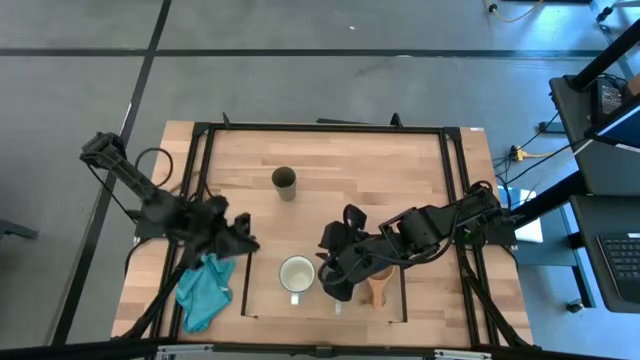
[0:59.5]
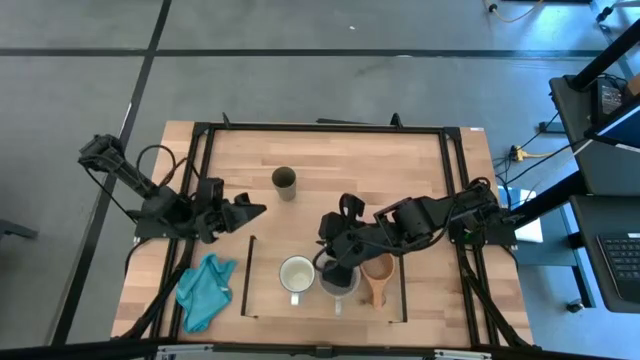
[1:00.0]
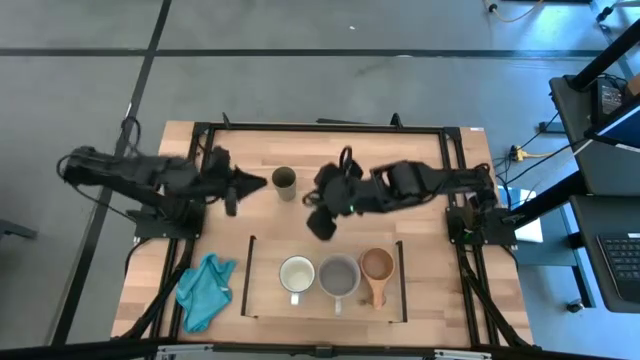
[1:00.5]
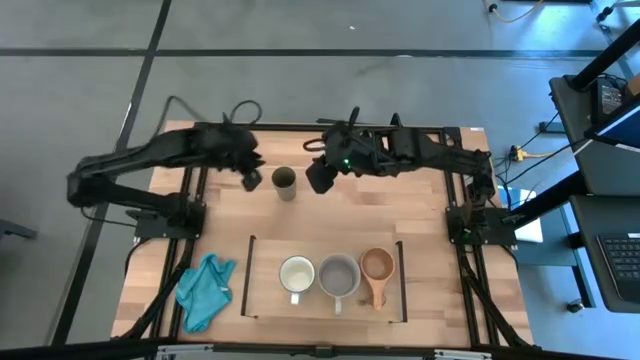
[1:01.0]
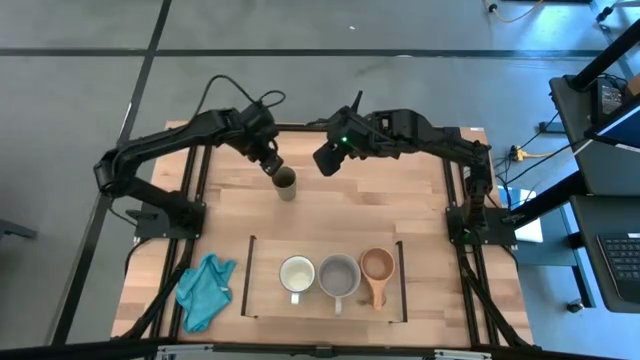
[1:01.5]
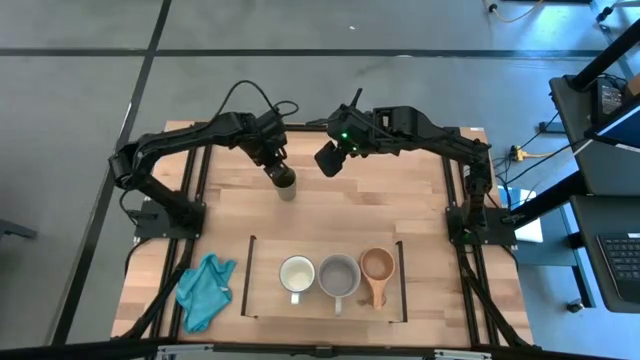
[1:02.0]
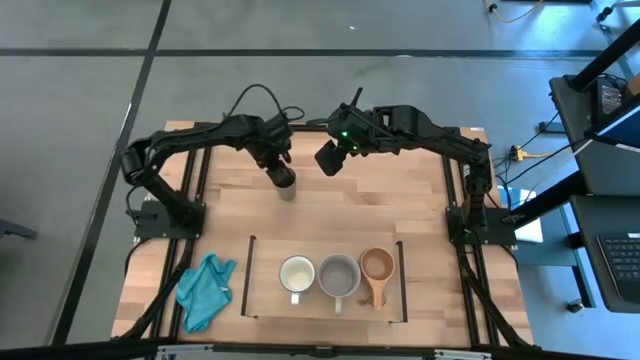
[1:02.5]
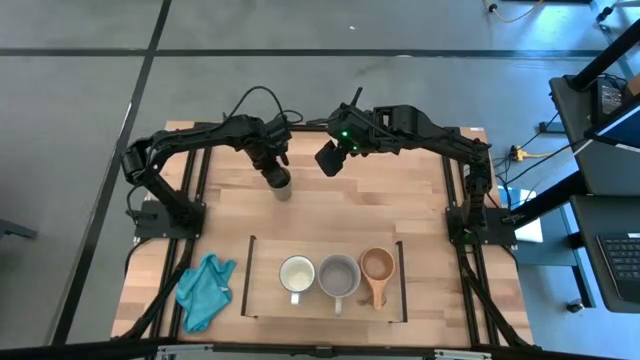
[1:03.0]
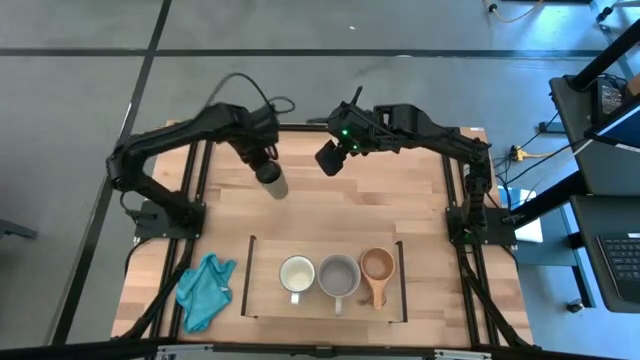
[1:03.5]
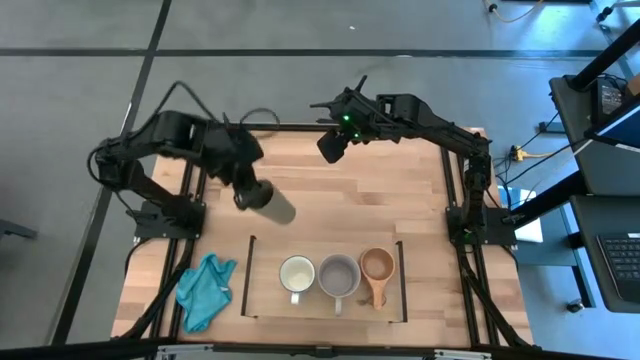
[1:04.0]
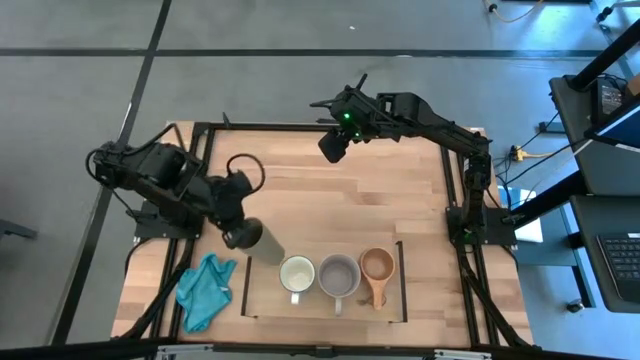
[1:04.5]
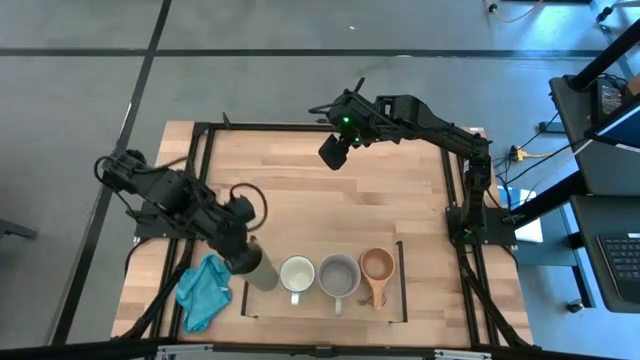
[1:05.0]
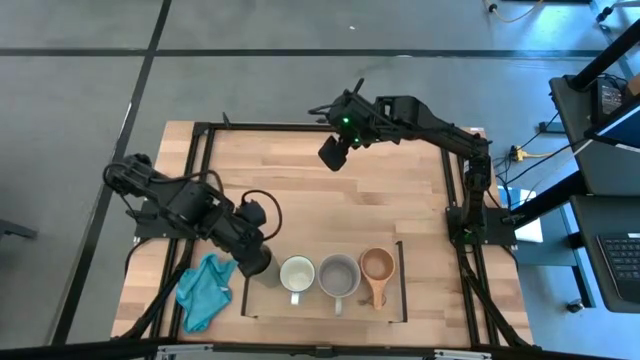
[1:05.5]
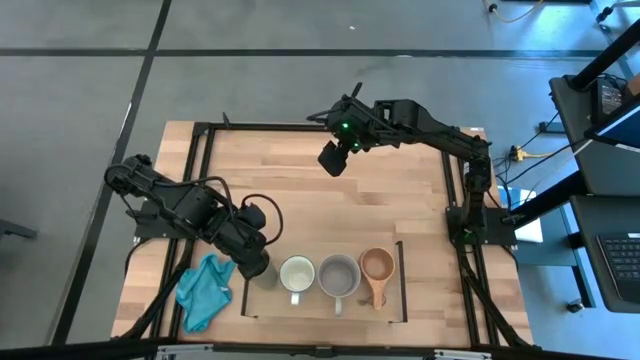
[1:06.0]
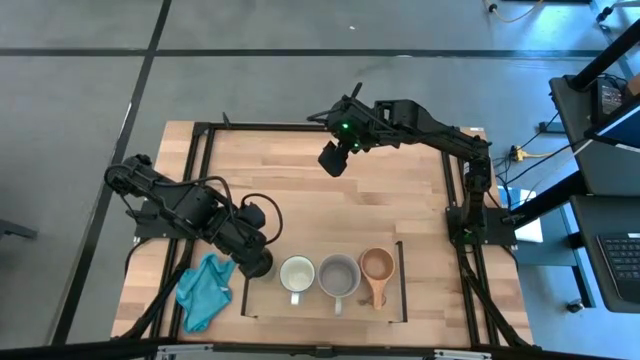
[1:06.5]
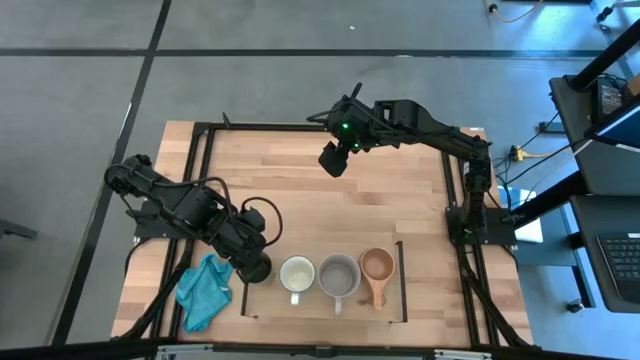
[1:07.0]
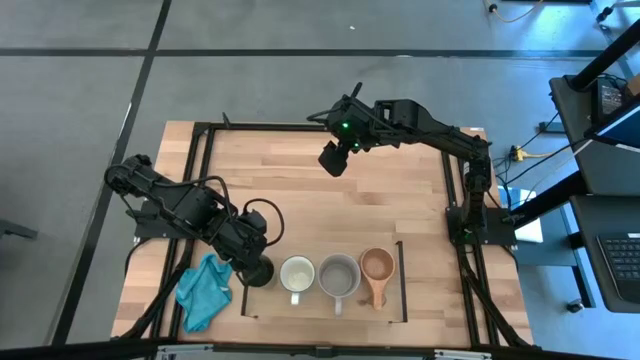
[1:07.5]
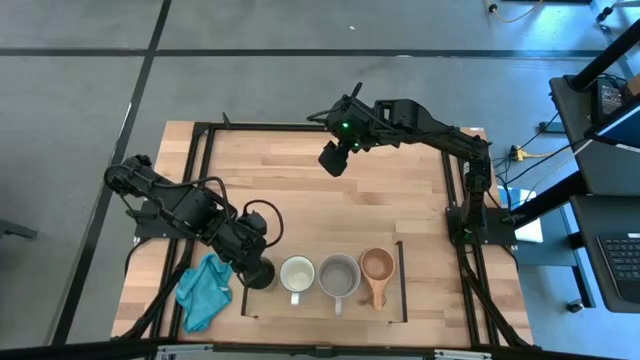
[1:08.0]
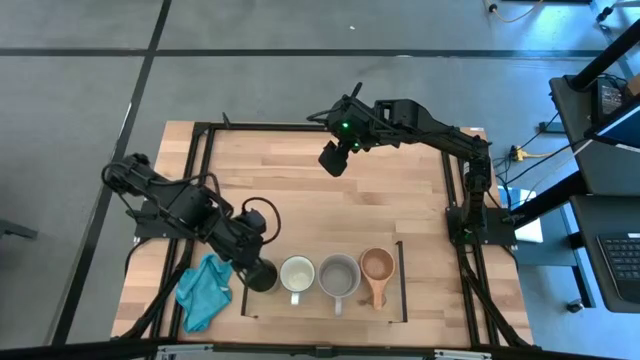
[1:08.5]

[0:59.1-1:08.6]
Task: Stack small to large cups/mugs on shelf
Put the gray cup on the shelf

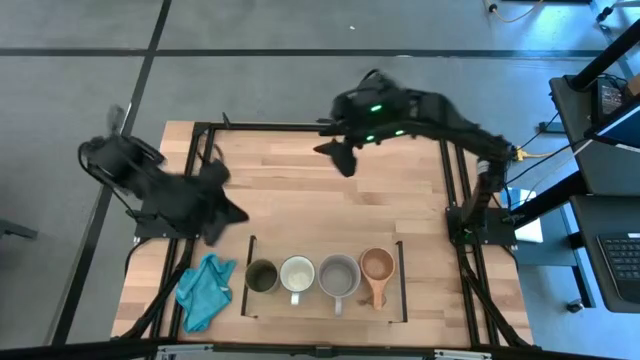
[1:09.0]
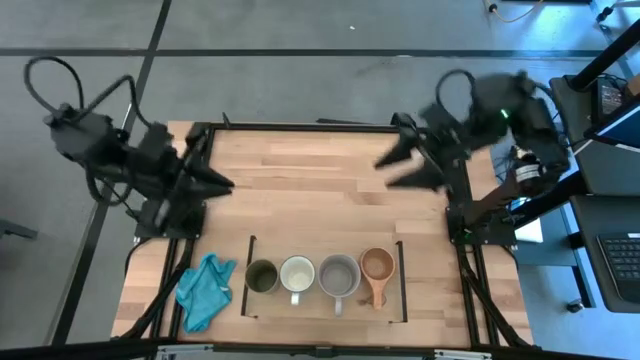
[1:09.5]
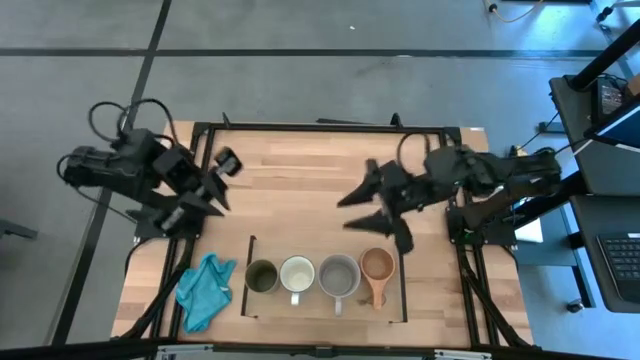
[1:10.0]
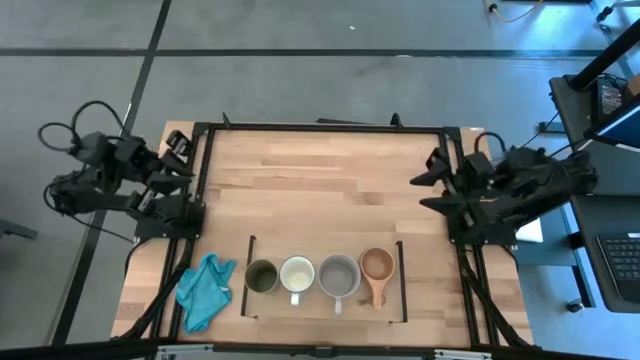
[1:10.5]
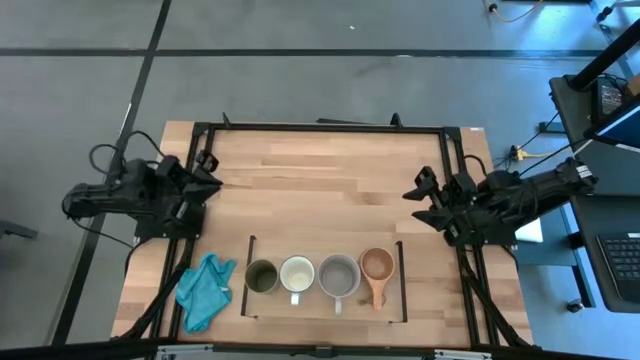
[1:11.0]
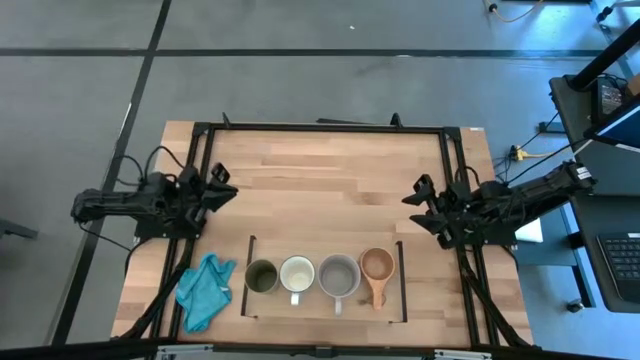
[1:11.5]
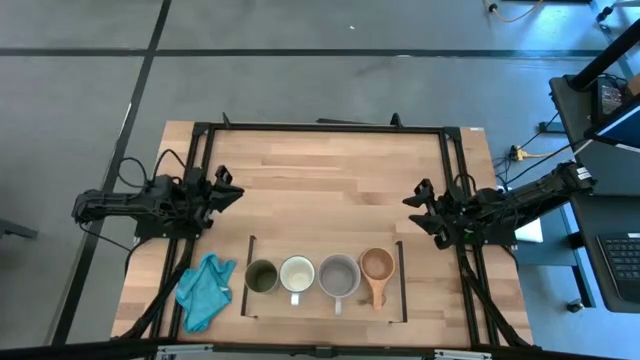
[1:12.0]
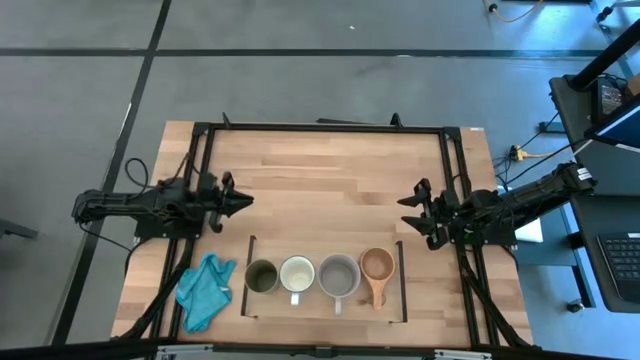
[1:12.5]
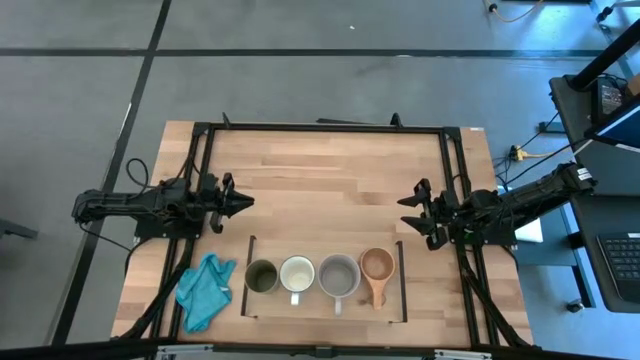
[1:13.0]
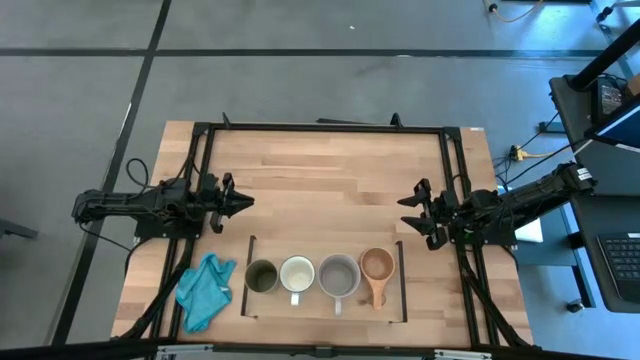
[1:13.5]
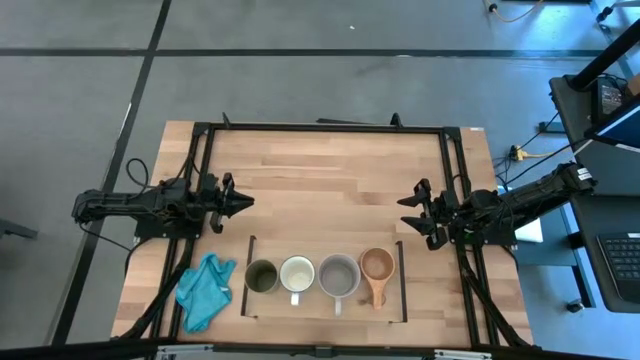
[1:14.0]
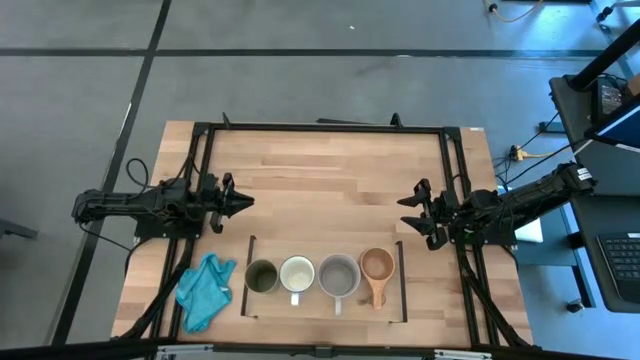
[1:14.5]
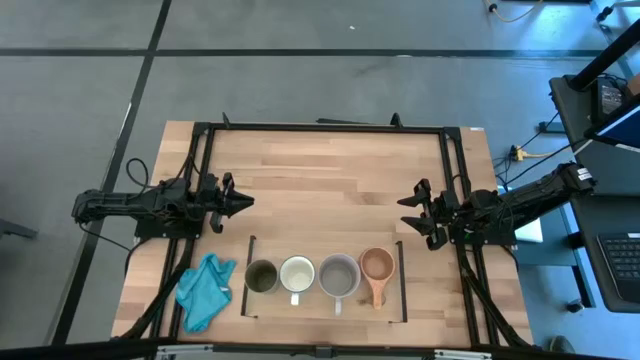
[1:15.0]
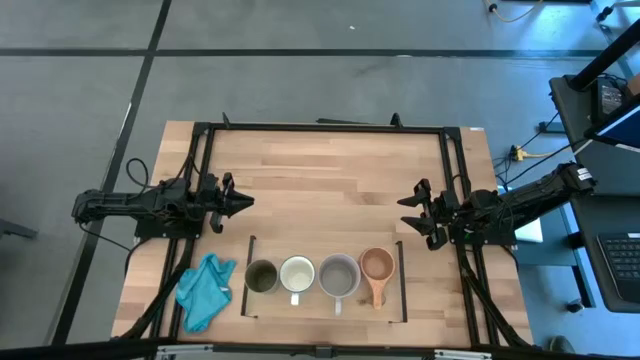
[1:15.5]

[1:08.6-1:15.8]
Return to Home Position

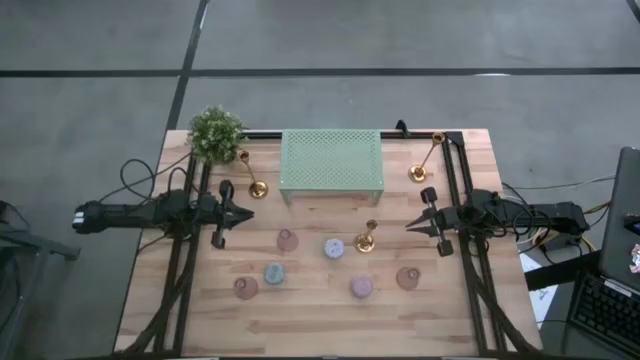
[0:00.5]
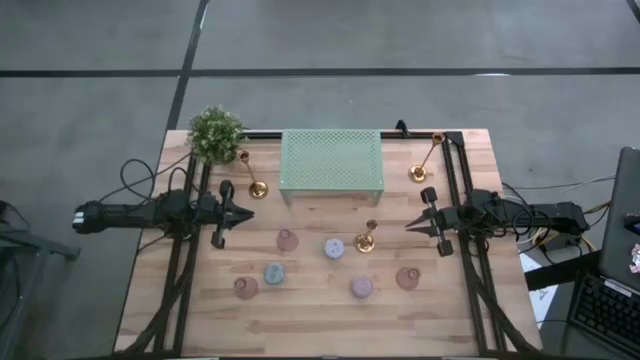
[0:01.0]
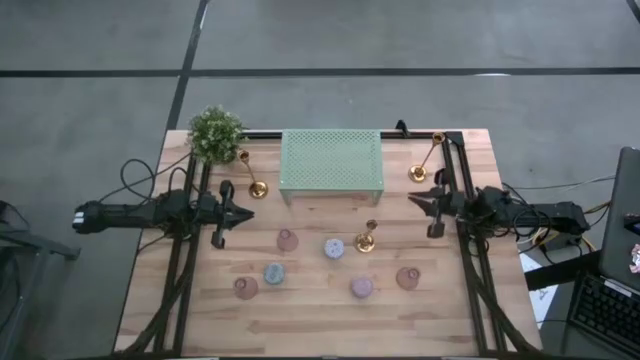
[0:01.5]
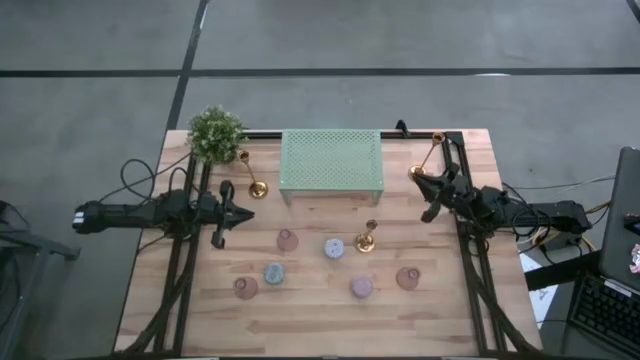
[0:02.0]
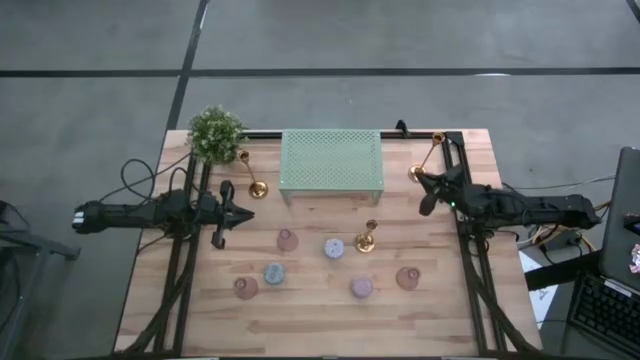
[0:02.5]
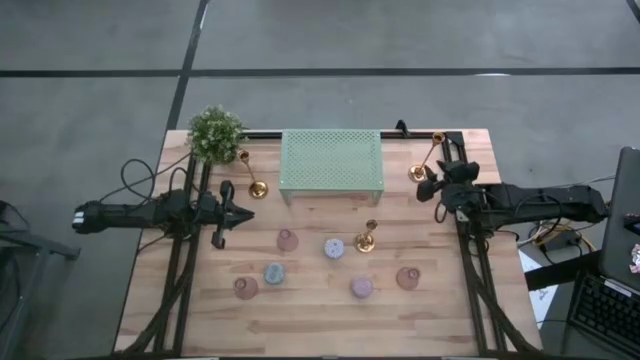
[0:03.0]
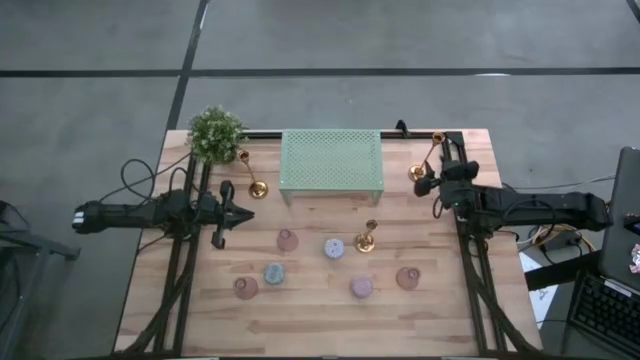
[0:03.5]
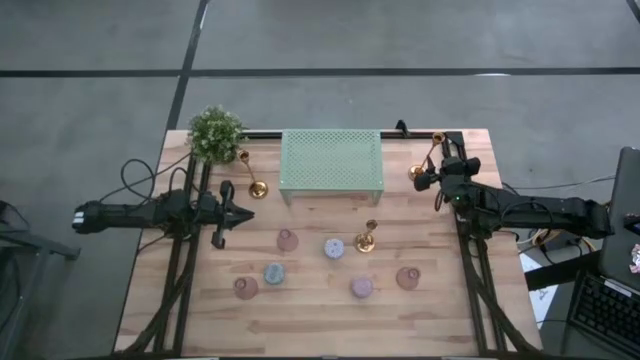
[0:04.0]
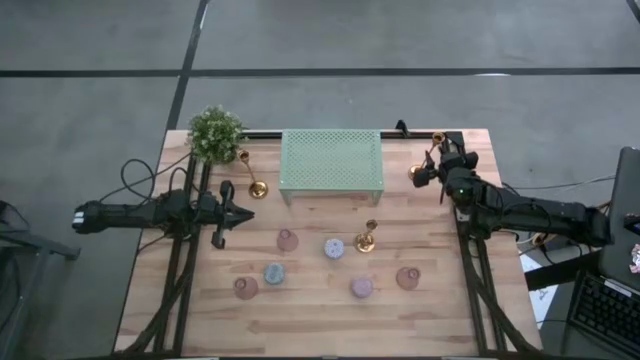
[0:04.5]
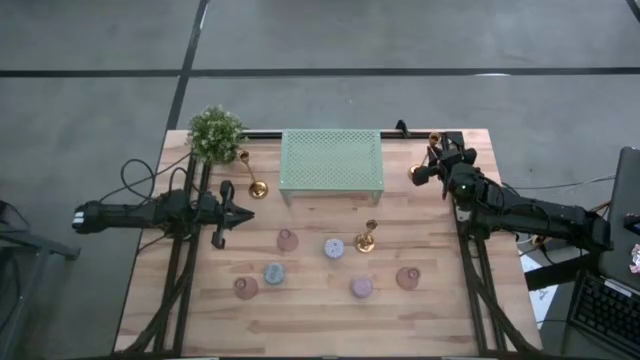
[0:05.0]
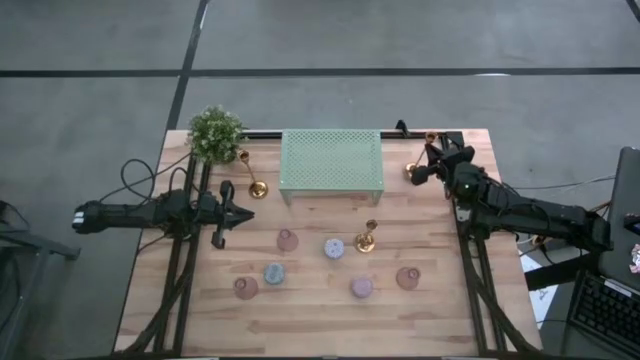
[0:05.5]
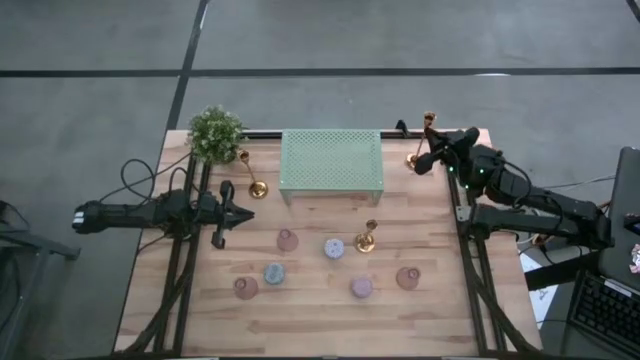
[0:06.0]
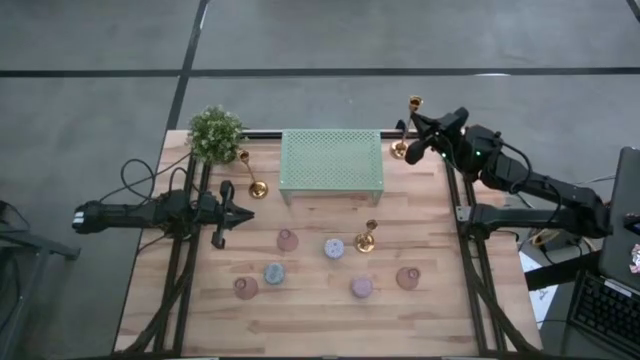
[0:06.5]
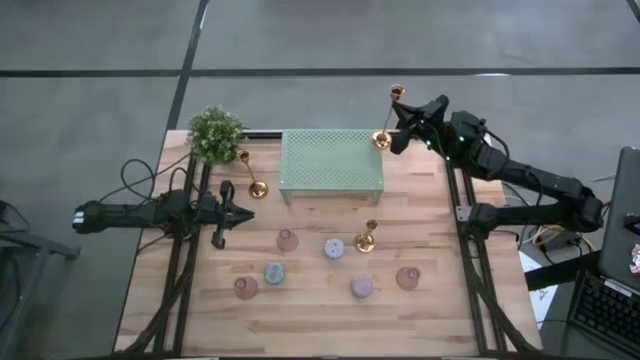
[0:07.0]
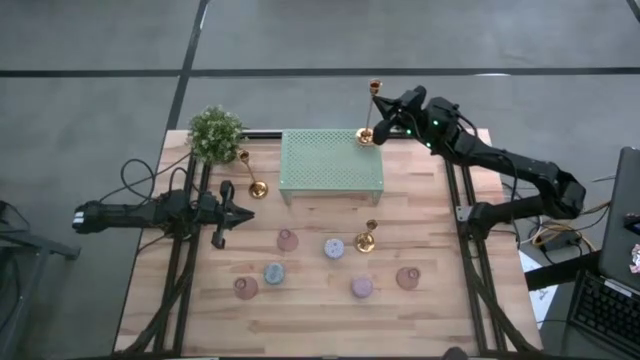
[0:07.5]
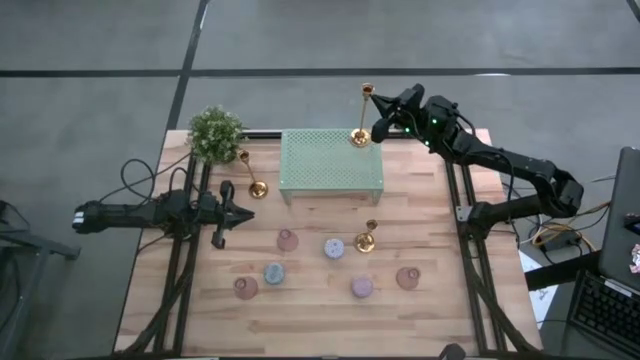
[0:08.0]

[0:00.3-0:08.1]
Task: Stock candles and vases on shelf
Put the right gold candle holder on the shelf
